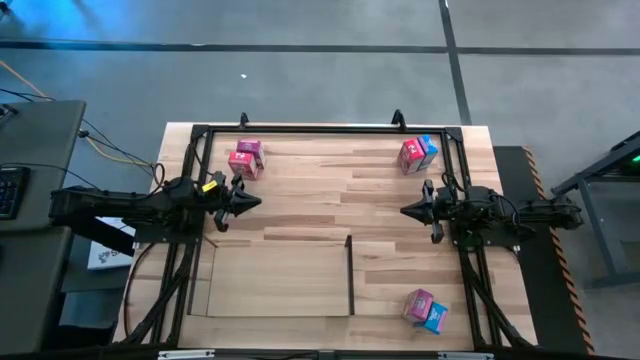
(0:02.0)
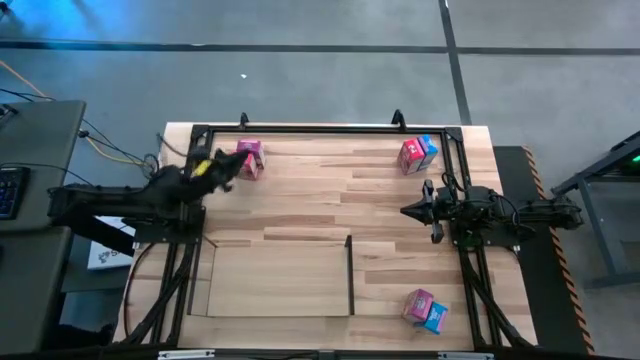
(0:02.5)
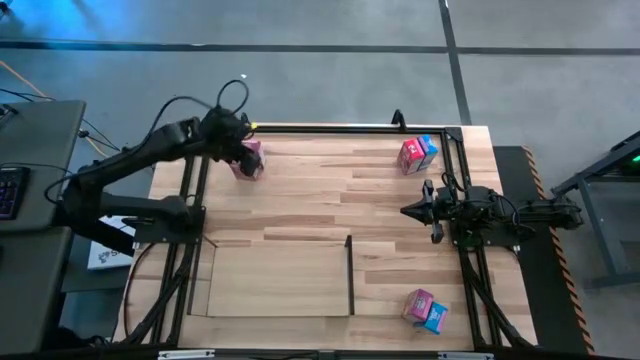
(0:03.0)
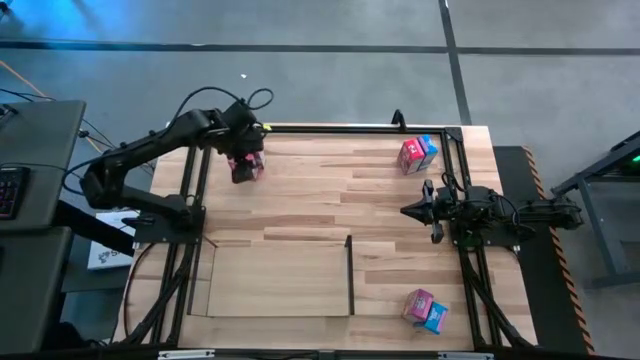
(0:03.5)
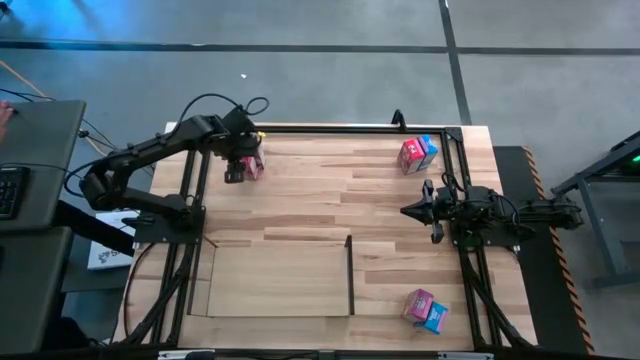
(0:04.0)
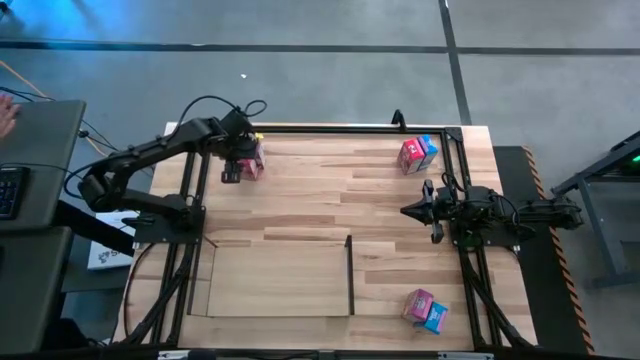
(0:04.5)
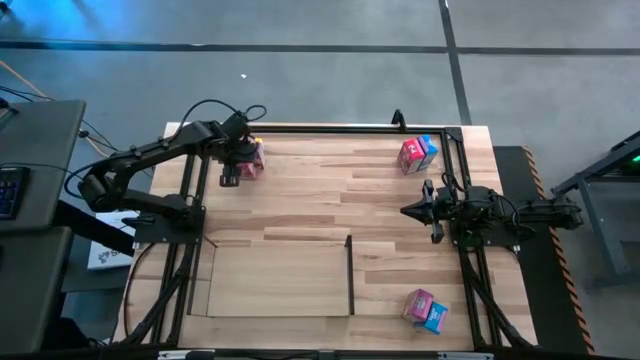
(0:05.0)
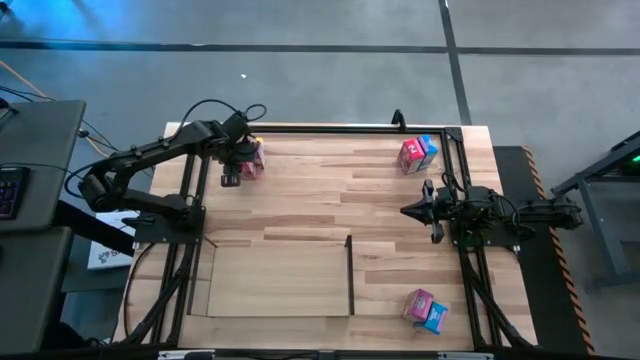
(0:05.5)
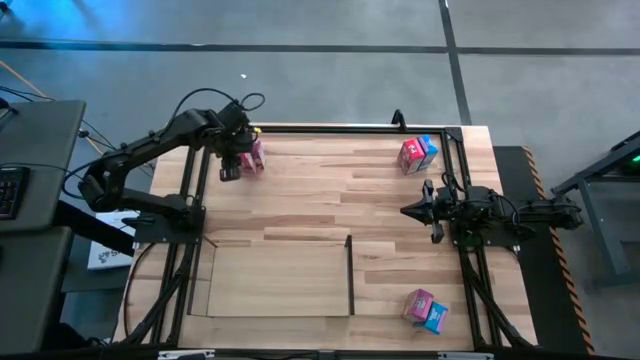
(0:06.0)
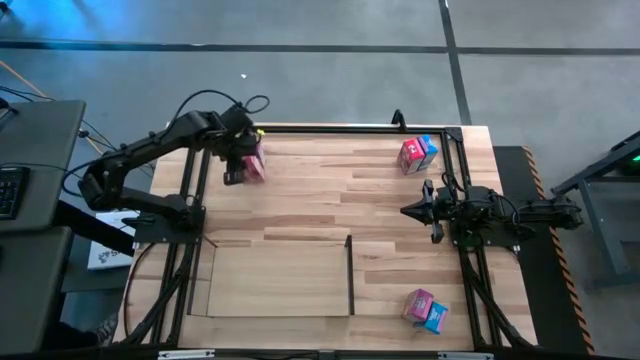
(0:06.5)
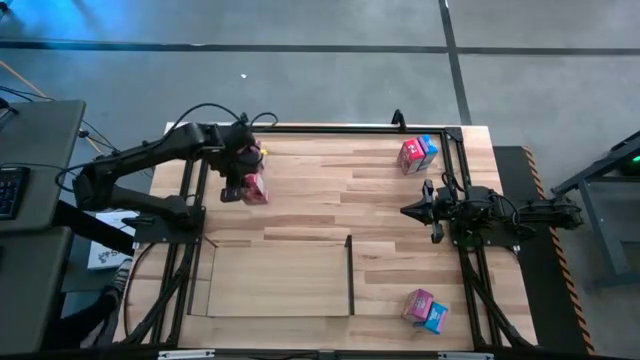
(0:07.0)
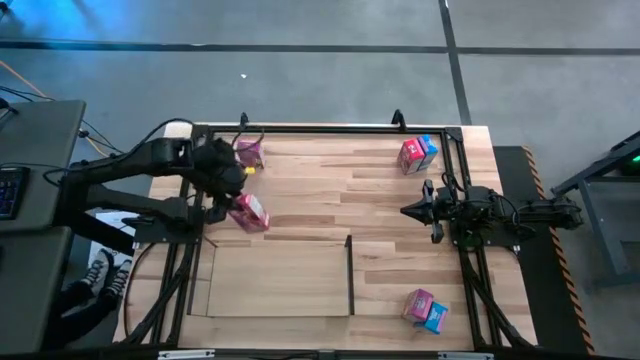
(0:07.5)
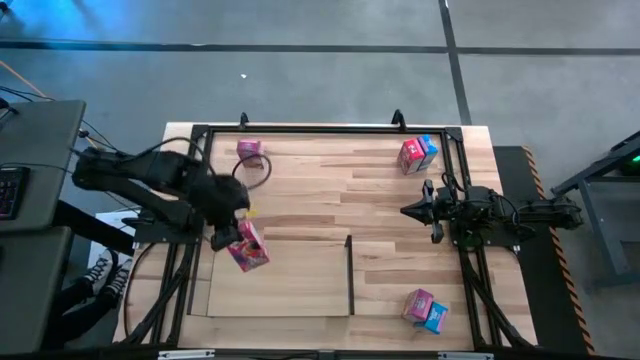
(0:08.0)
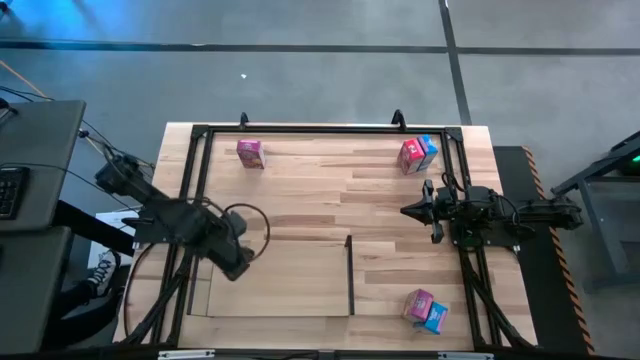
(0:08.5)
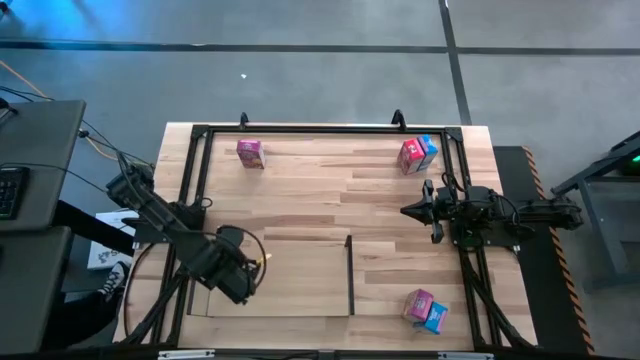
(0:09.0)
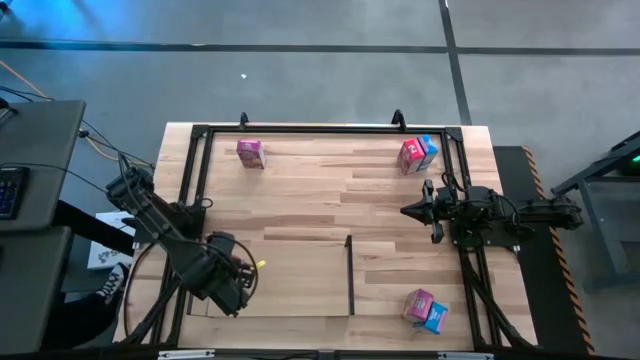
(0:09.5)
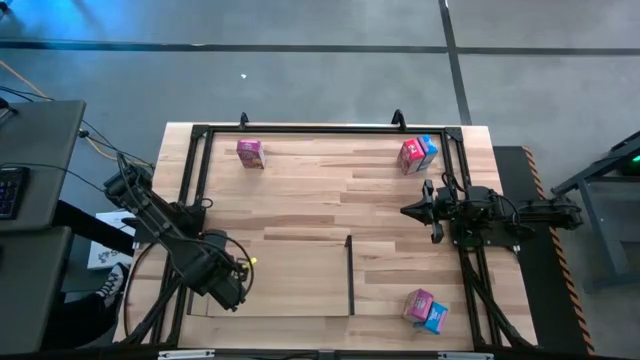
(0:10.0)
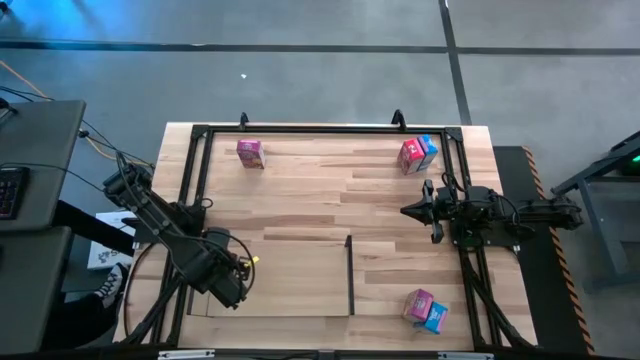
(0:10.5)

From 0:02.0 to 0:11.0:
Task: Stack cereal on shelf
Put the left red cereal box on the shelf

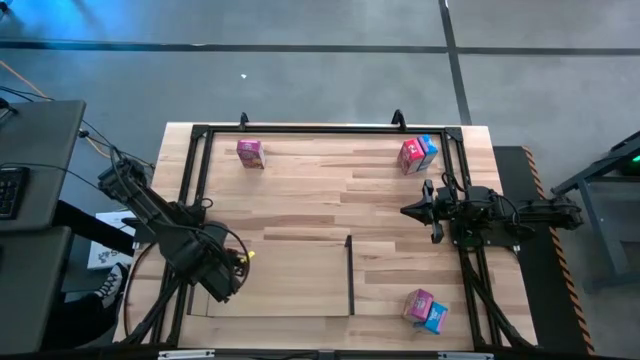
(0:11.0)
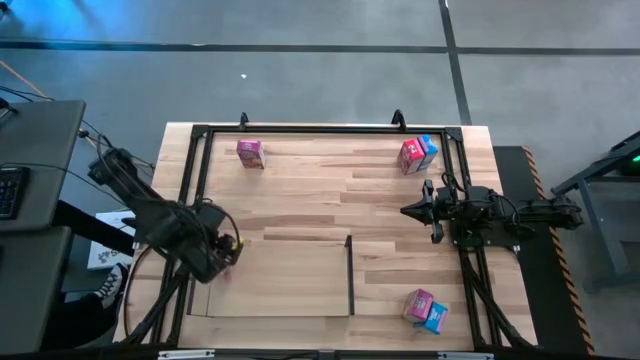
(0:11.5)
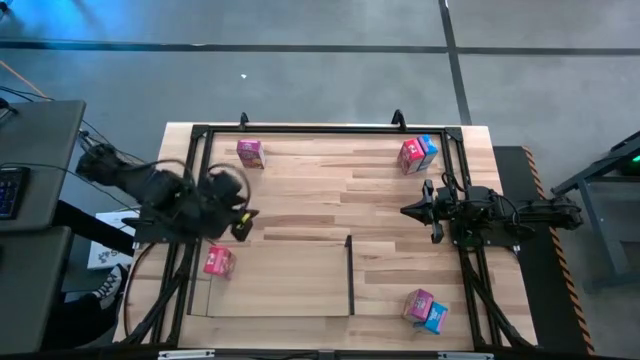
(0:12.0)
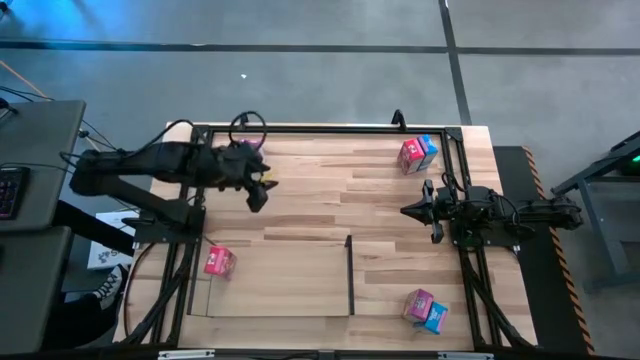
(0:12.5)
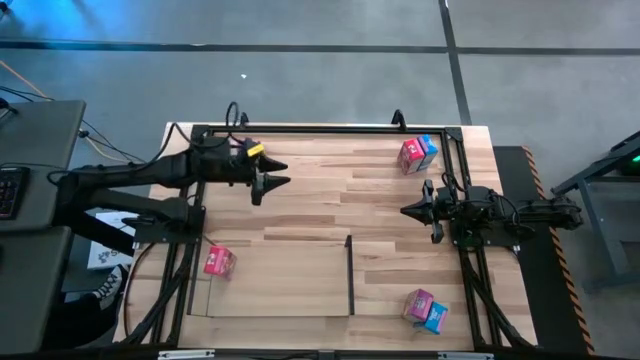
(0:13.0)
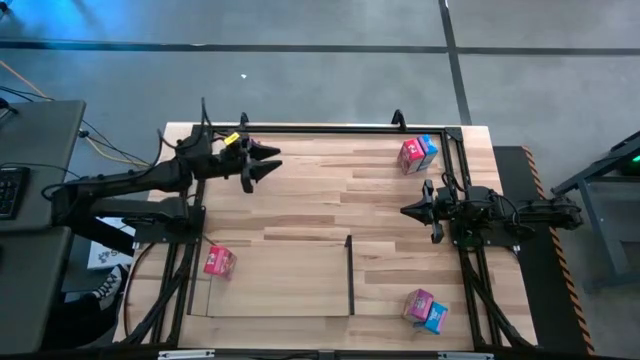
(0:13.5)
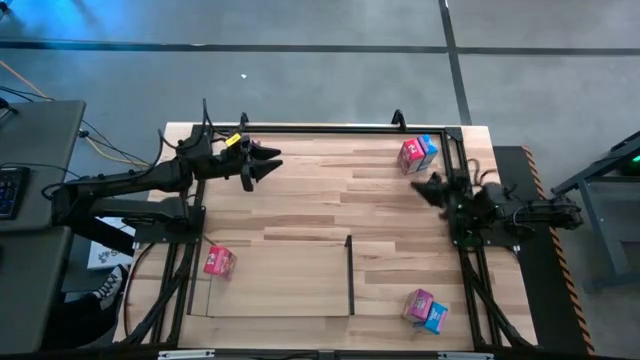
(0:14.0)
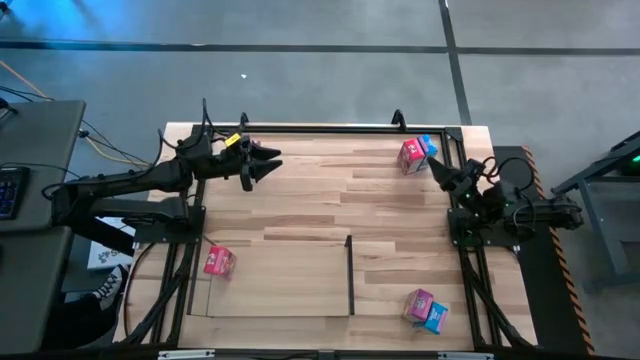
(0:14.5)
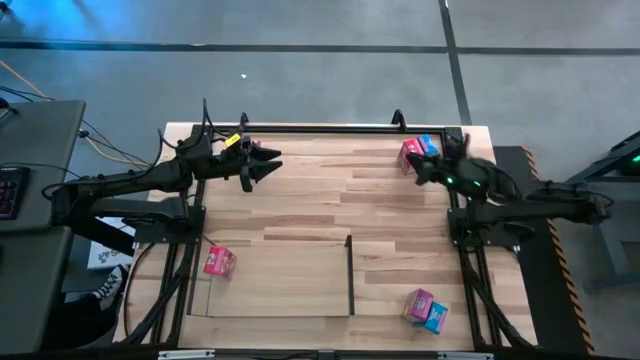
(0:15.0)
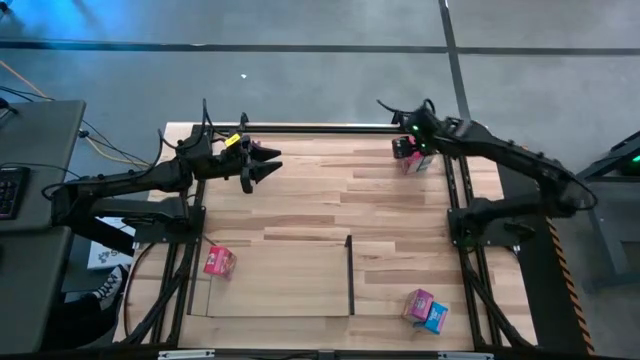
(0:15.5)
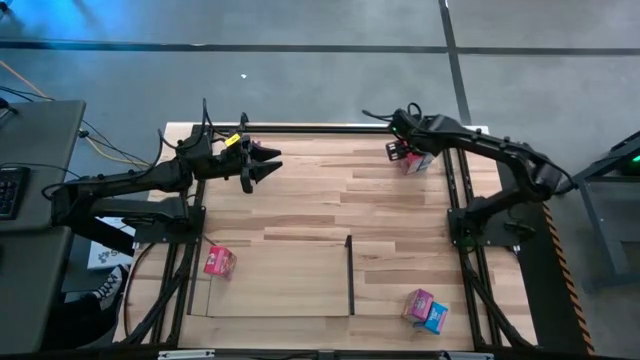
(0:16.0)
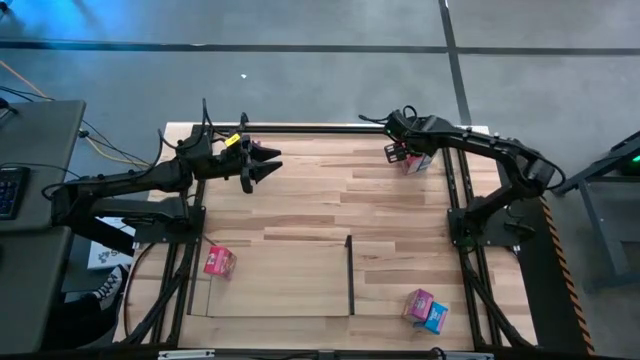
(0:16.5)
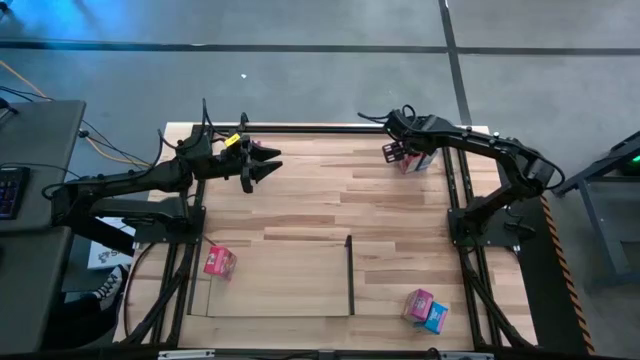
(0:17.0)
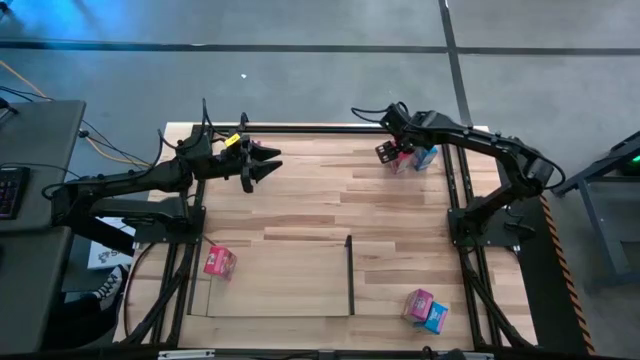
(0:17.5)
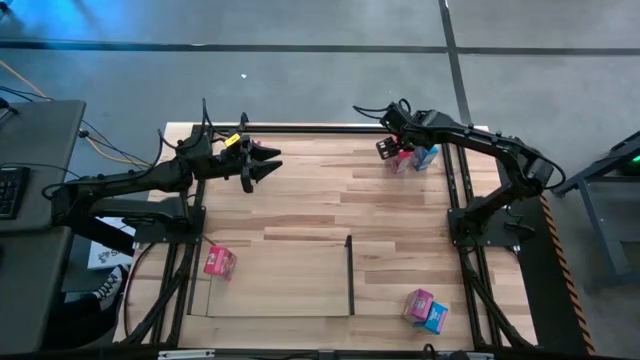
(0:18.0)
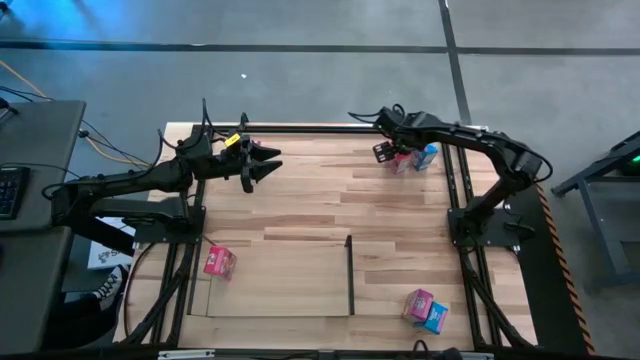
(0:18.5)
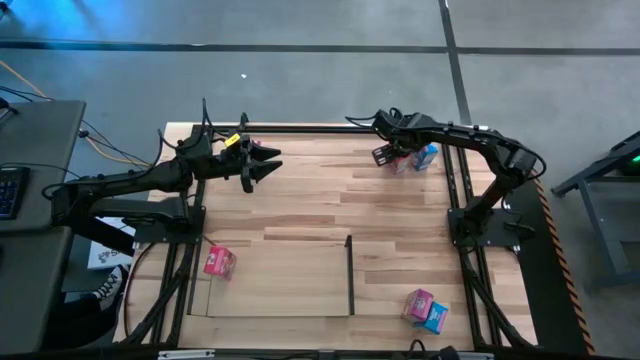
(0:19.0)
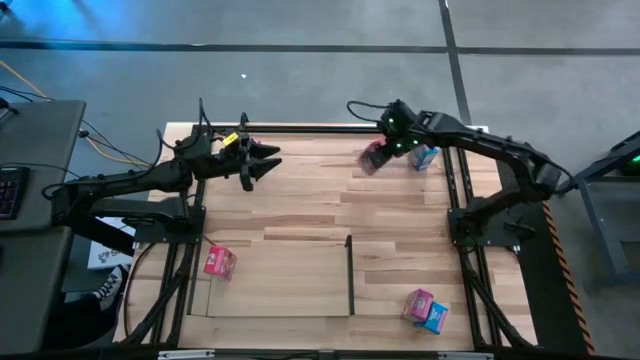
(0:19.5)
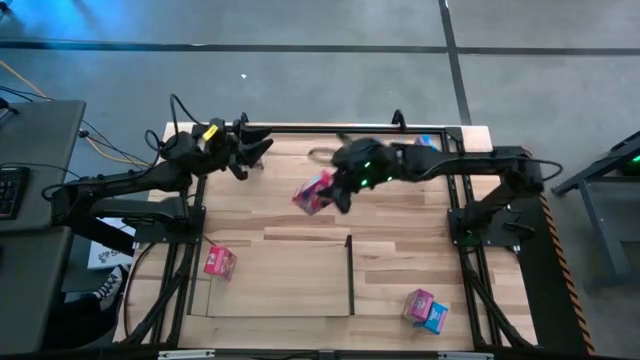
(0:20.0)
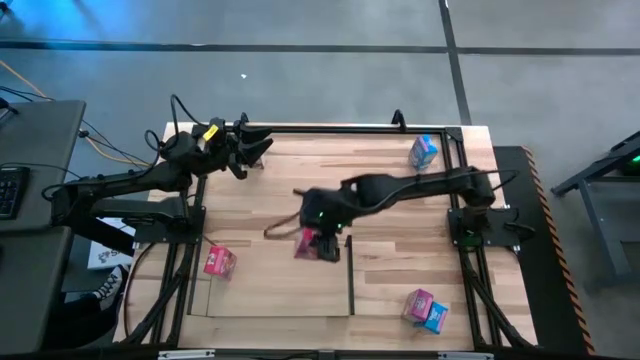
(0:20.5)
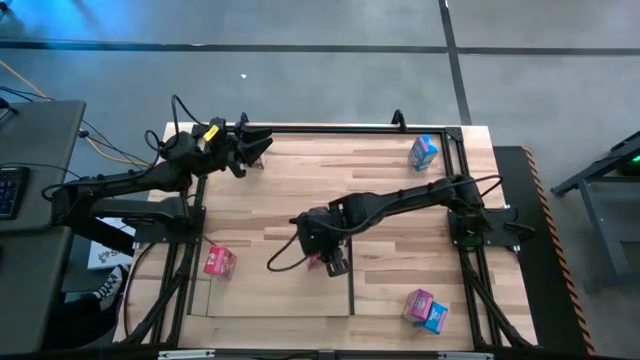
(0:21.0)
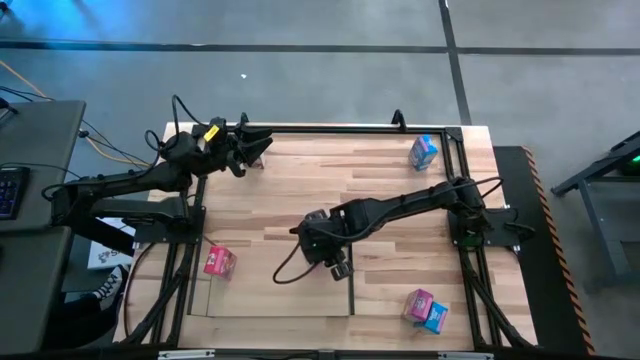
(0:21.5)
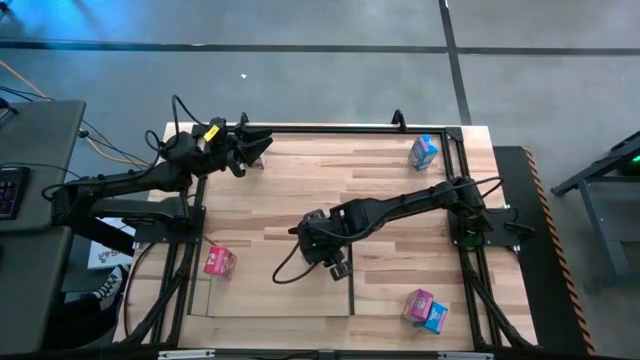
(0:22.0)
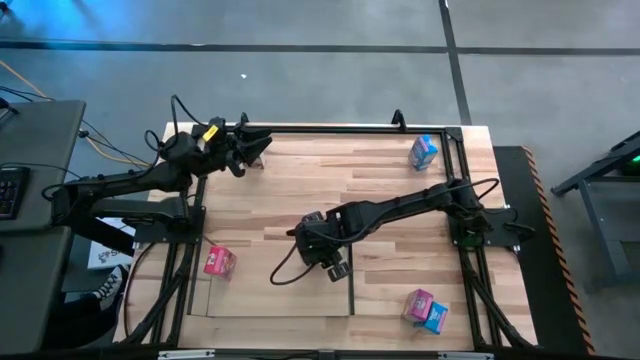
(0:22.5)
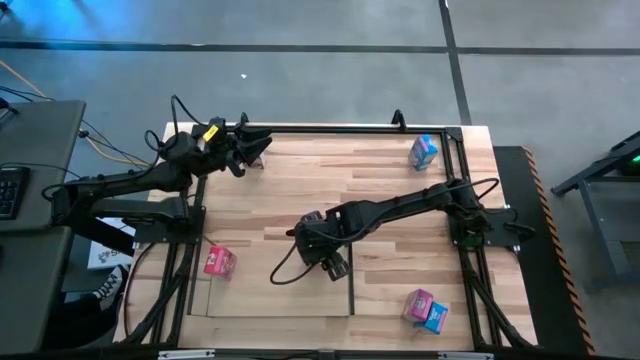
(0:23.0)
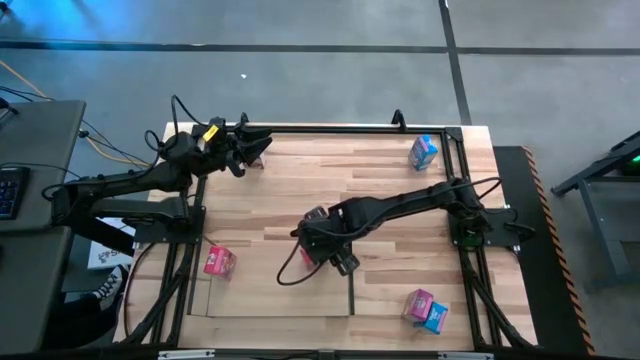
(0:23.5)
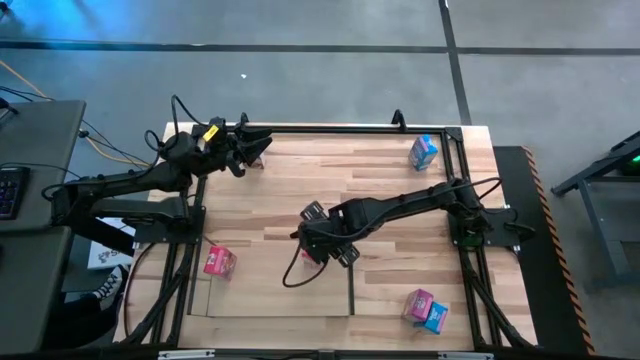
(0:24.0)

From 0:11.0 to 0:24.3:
Put the red cereal box on the shelf
